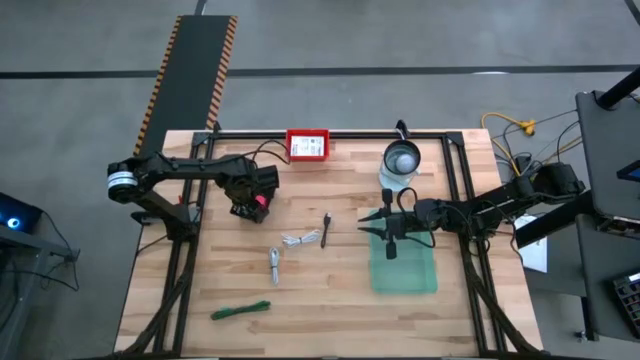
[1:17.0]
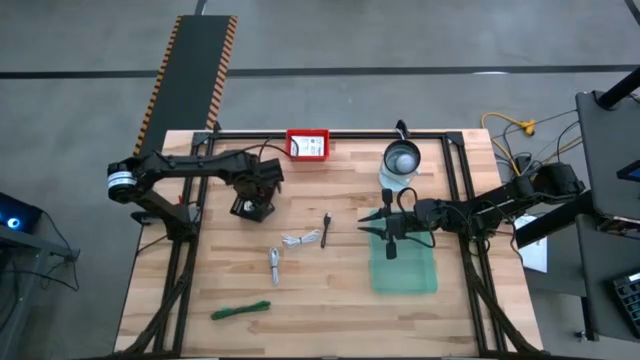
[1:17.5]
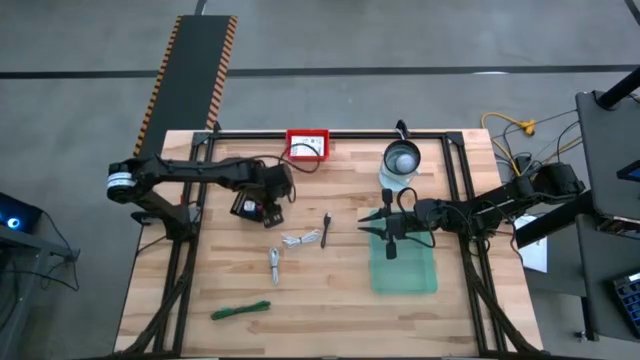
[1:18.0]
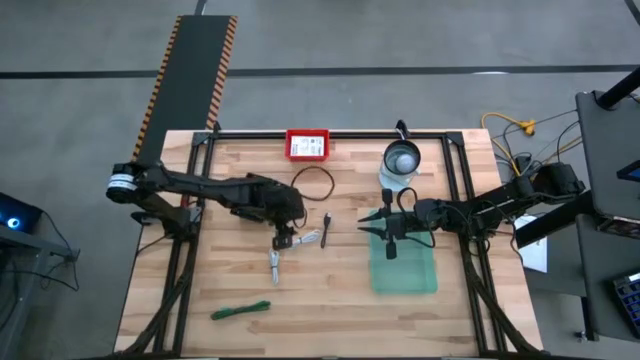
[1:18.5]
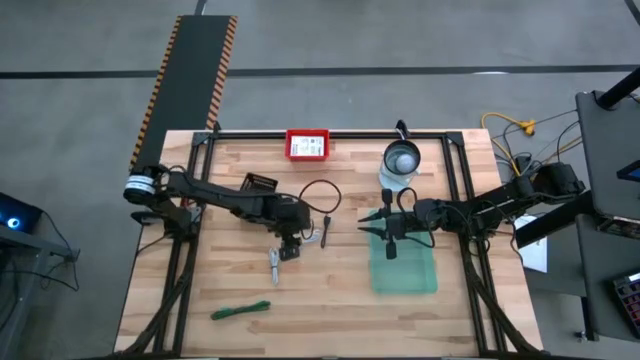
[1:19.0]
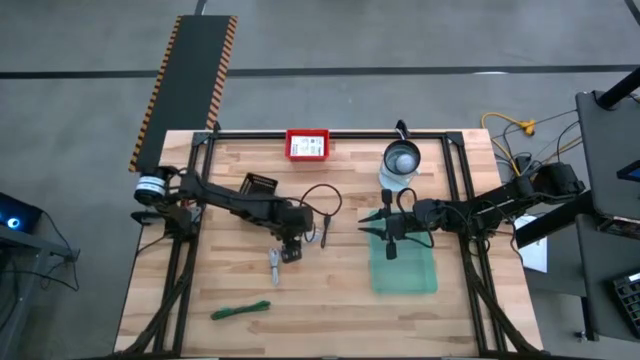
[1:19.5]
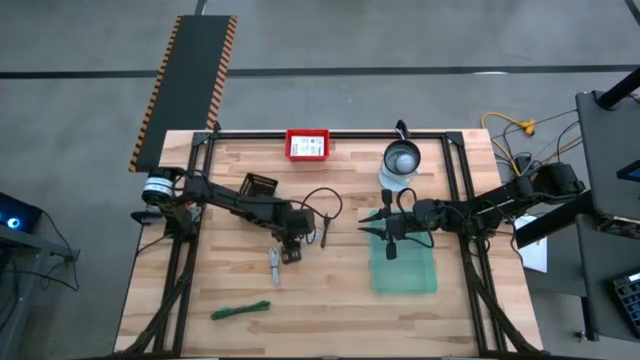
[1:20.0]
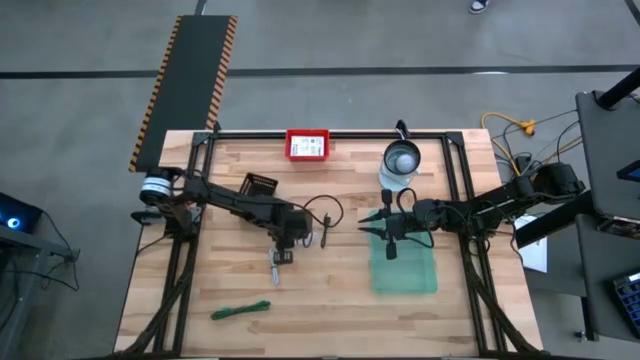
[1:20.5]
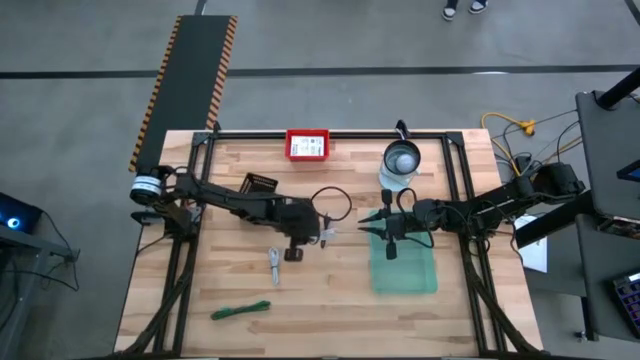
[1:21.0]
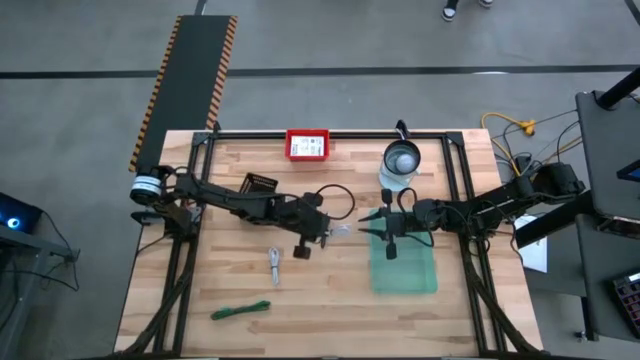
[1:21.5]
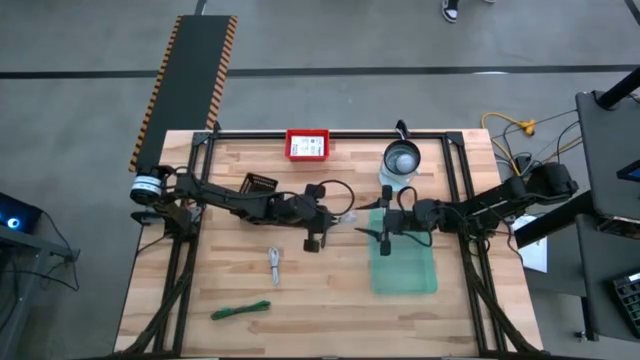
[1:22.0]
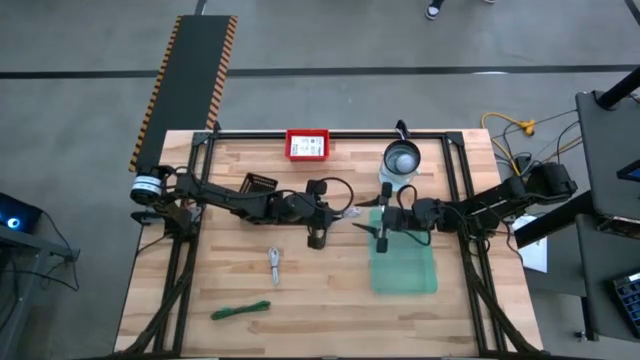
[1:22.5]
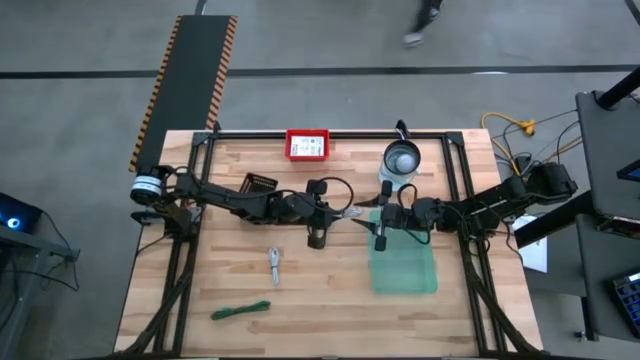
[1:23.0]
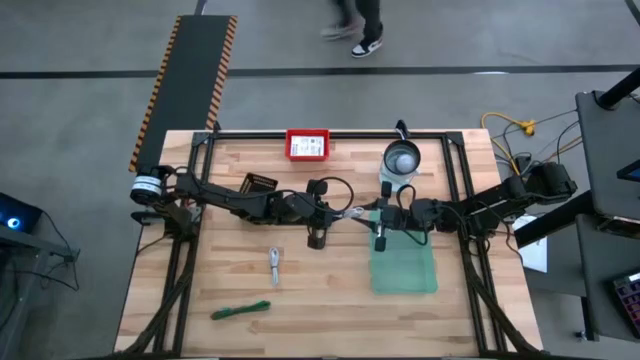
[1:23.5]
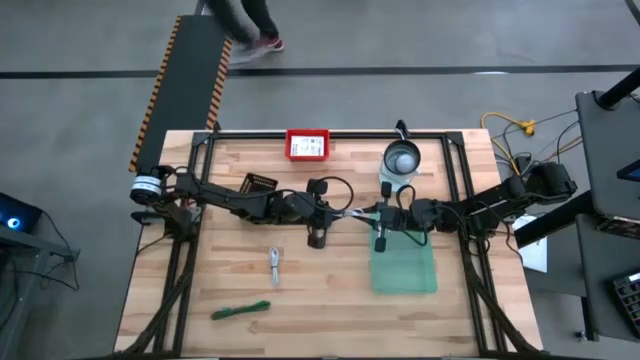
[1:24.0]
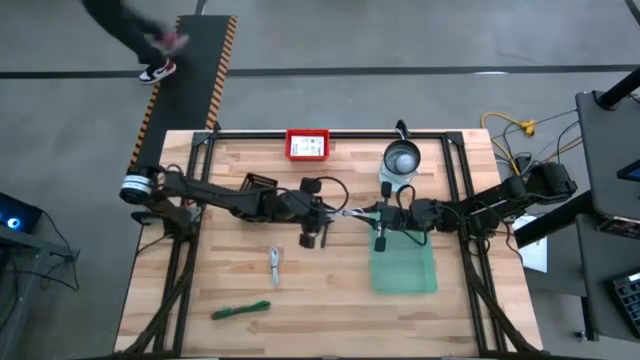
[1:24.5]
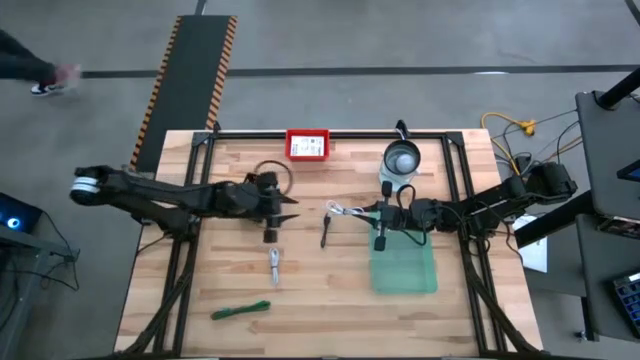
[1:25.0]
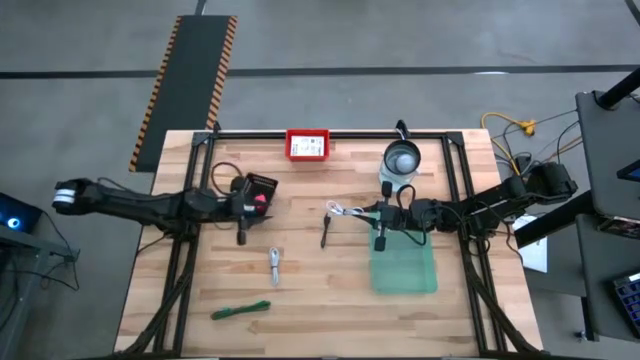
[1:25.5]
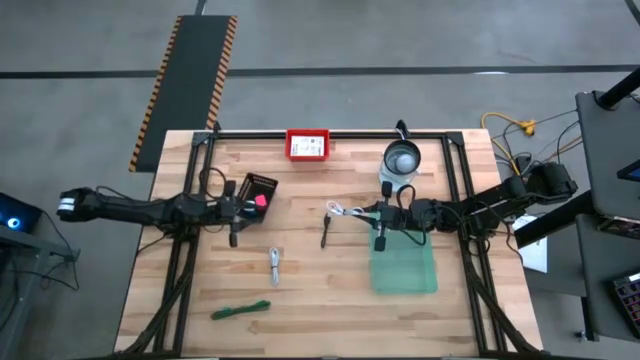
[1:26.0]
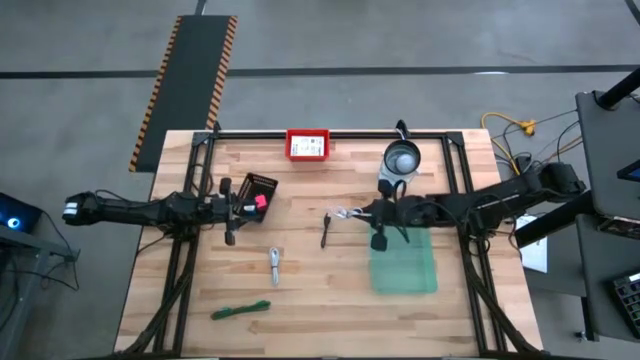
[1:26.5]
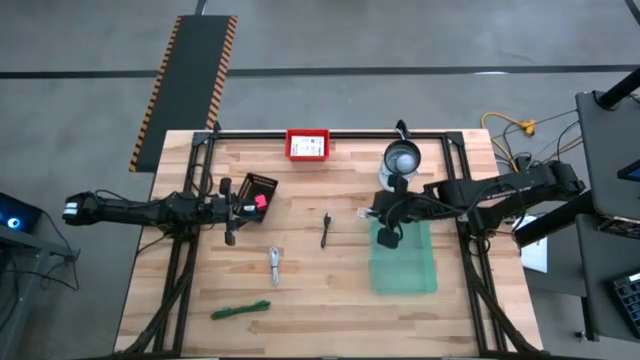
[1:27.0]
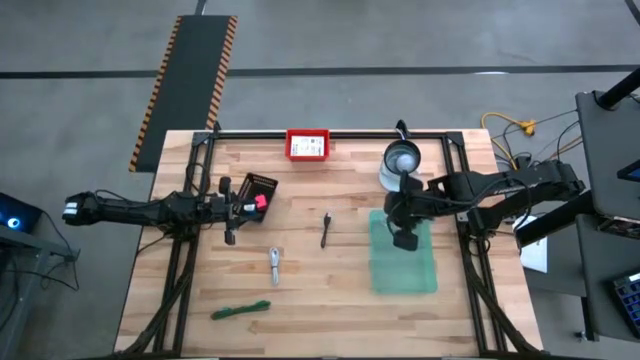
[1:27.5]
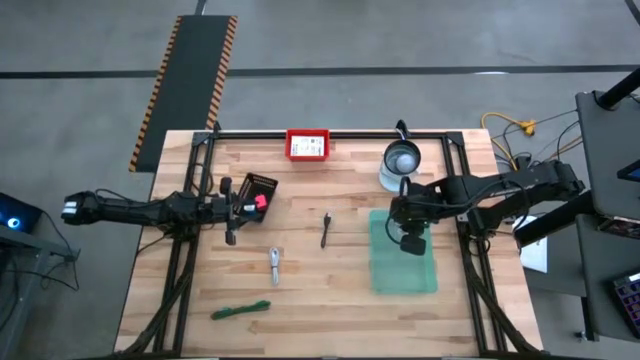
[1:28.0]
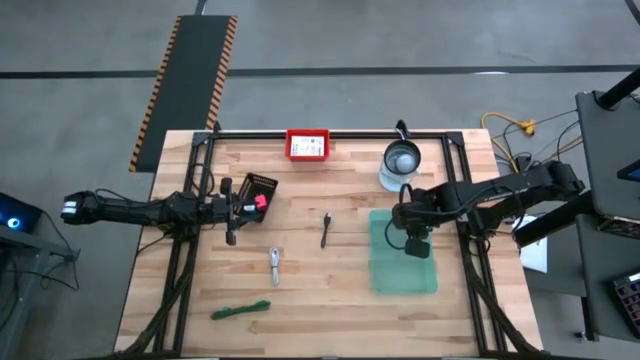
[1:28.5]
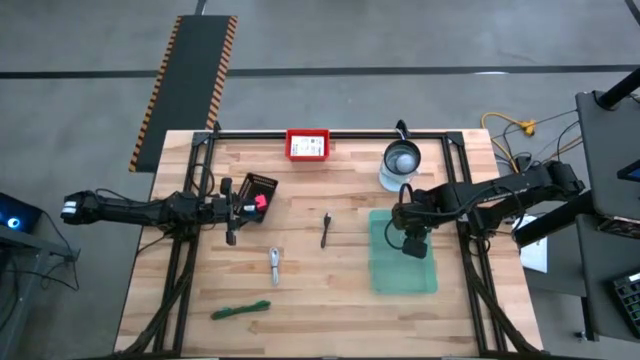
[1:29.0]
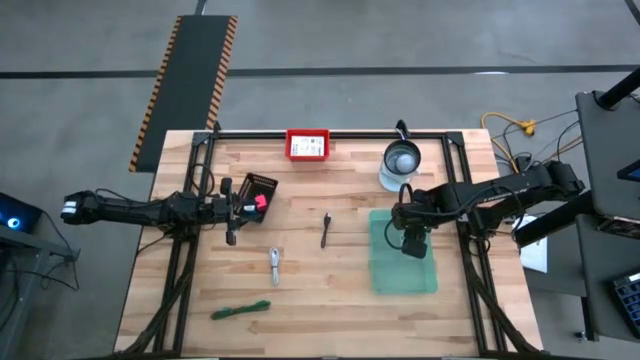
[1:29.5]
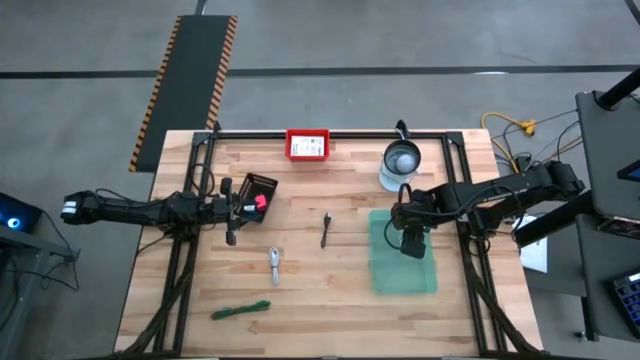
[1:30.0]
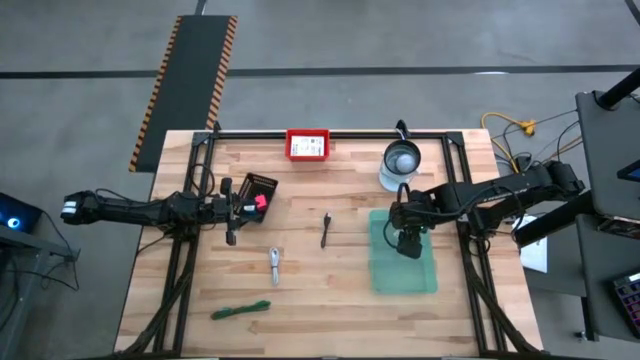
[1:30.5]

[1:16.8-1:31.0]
Task: Pick and place items into bin
Put the top white charger cable into the green bin

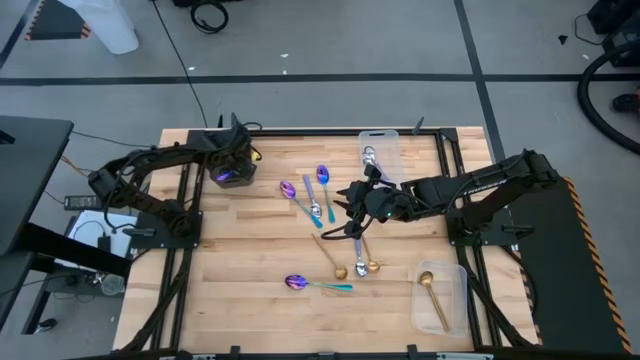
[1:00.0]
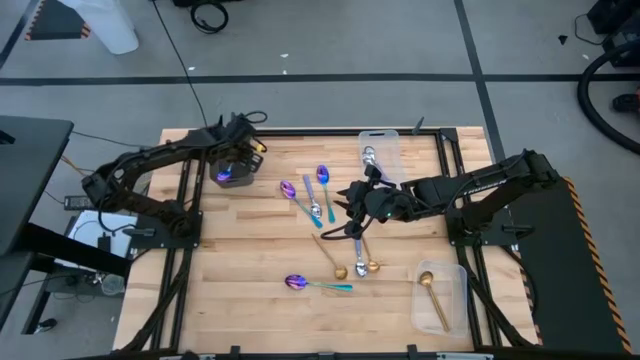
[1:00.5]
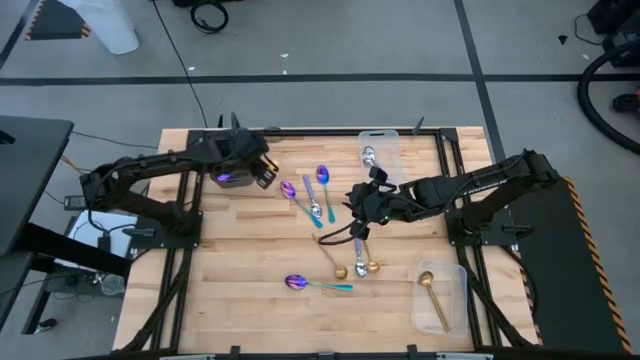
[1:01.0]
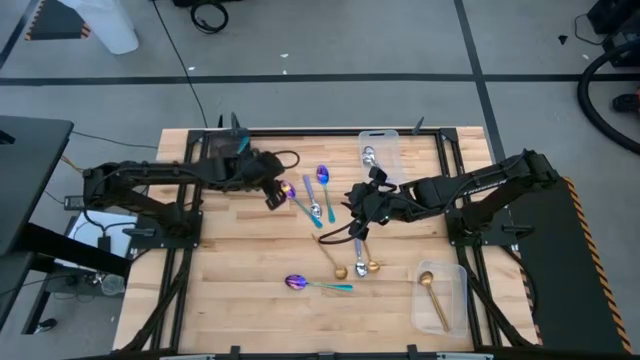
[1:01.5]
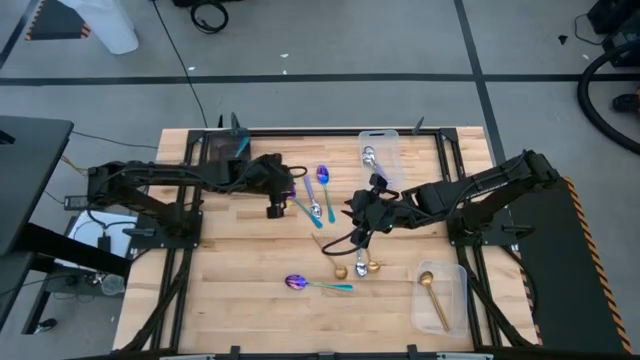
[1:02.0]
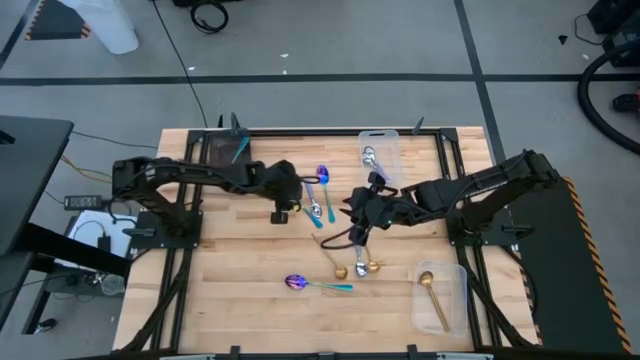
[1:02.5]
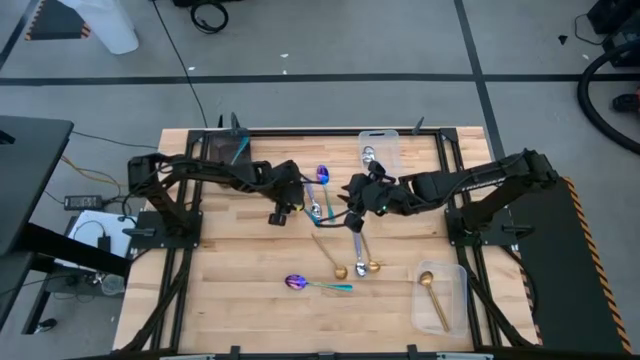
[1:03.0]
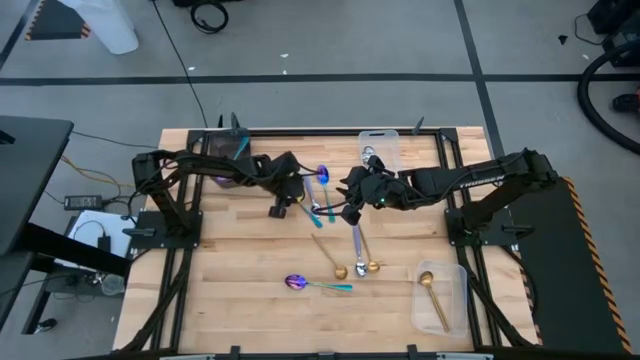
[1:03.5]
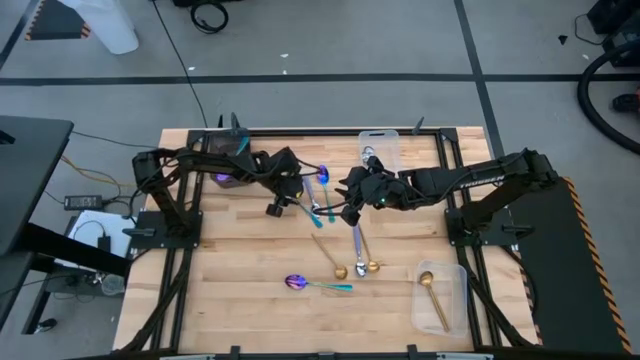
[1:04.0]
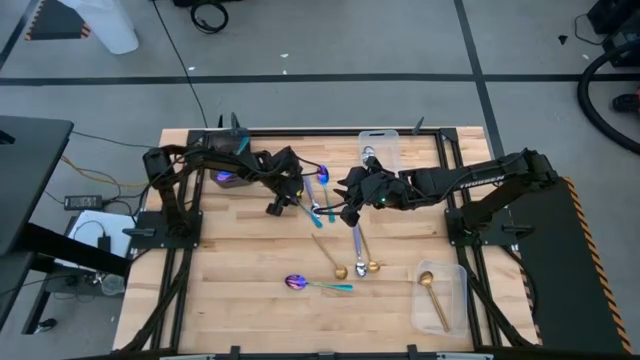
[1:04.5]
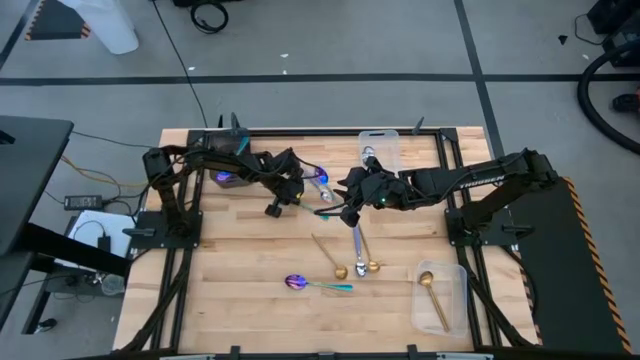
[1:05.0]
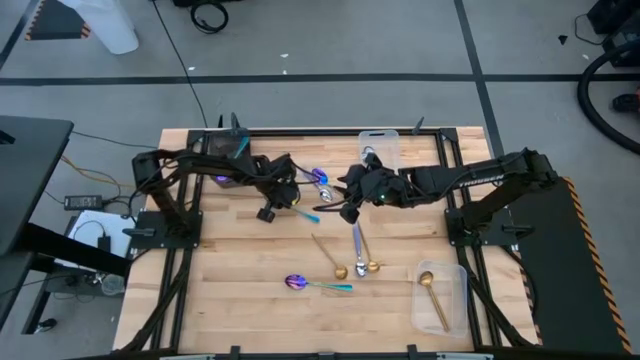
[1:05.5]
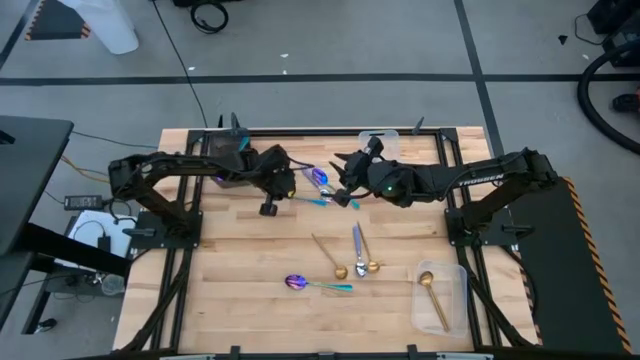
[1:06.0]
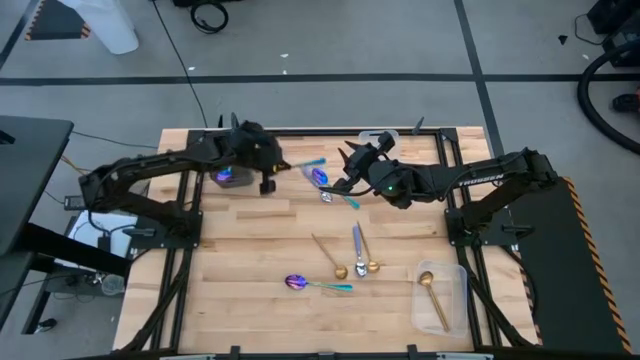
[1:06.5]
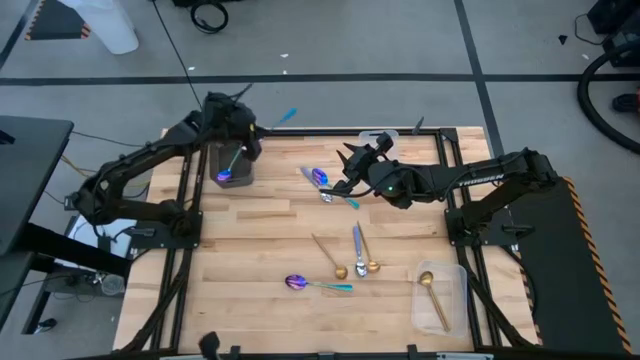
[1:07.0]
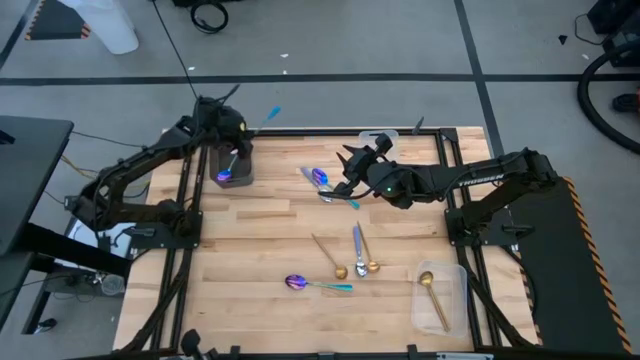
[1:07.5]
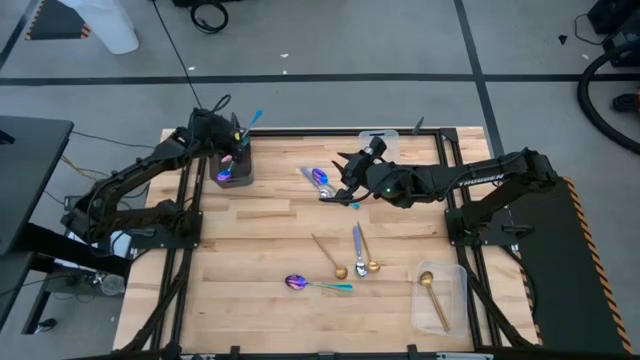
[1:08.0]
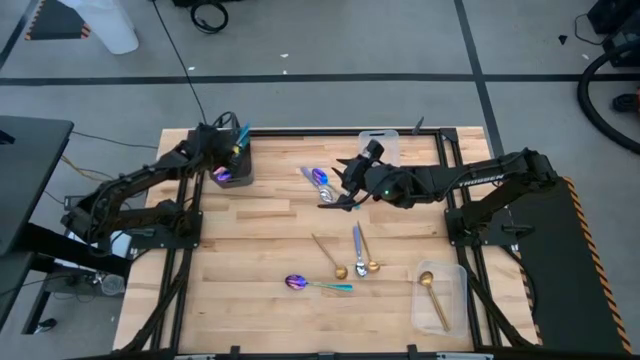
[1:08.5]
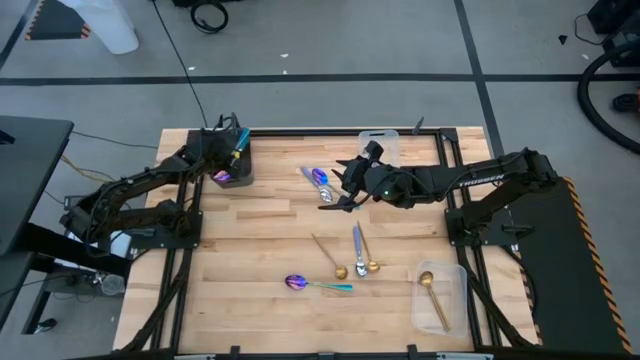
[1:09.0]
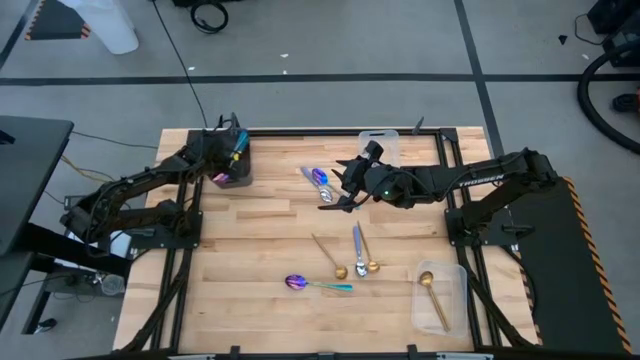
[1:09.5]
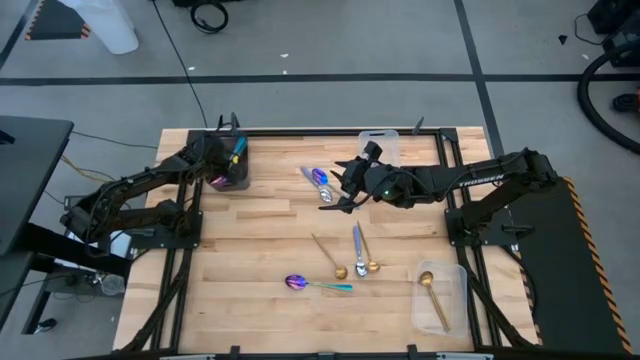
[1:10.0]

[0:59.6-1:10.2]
Task: Sort silverware by color (type)
Put the blue spoon into the black bin
